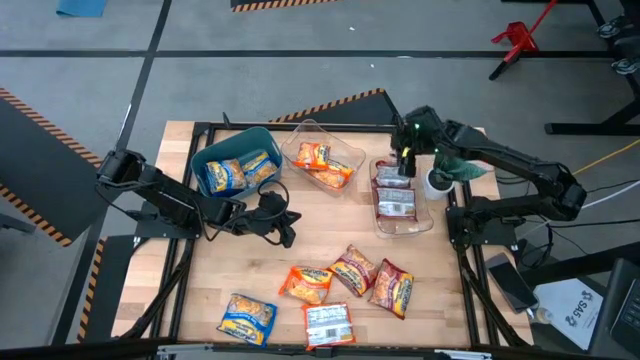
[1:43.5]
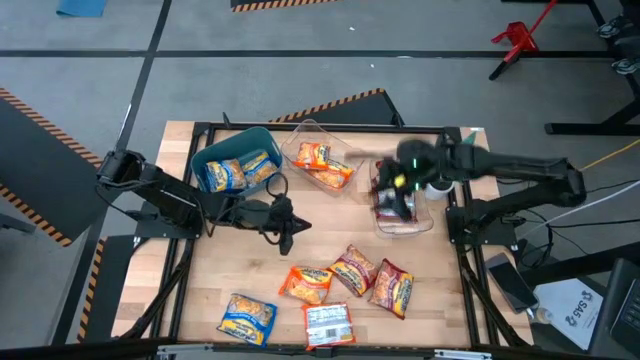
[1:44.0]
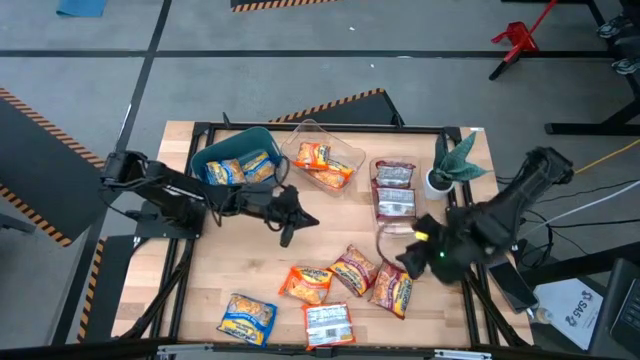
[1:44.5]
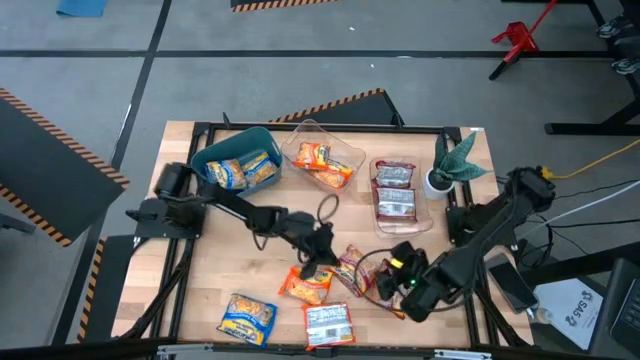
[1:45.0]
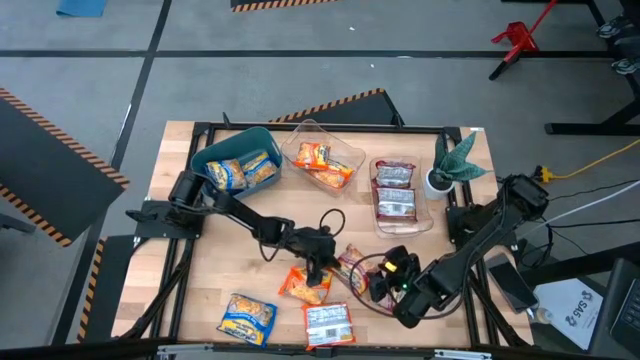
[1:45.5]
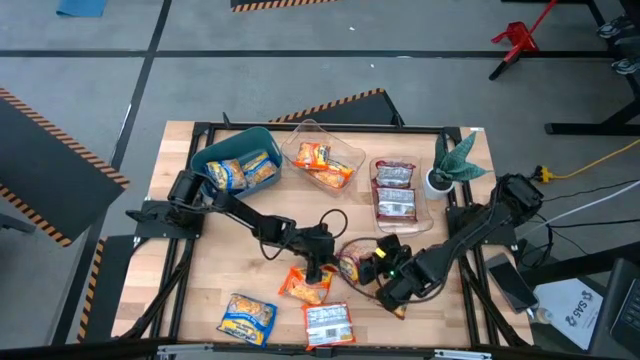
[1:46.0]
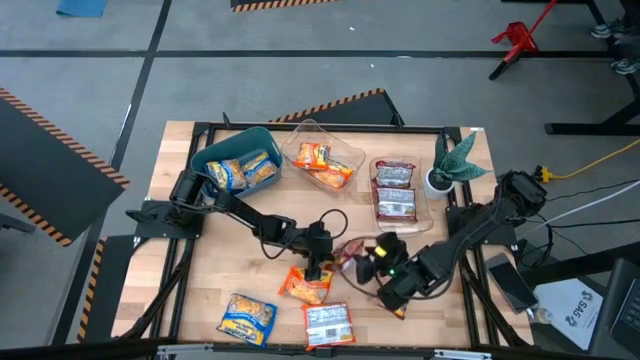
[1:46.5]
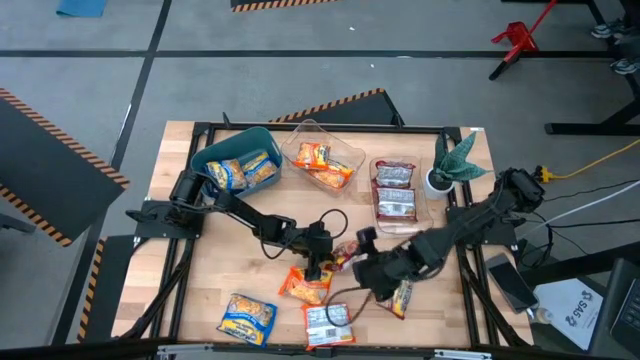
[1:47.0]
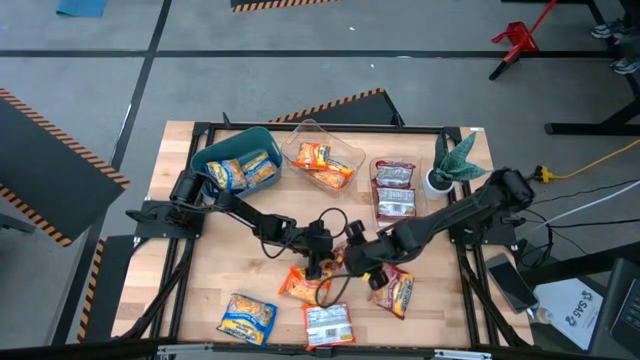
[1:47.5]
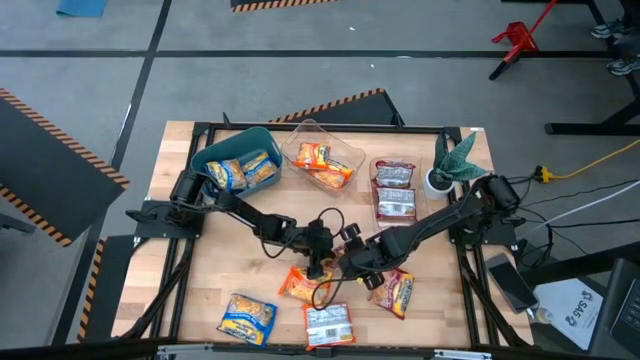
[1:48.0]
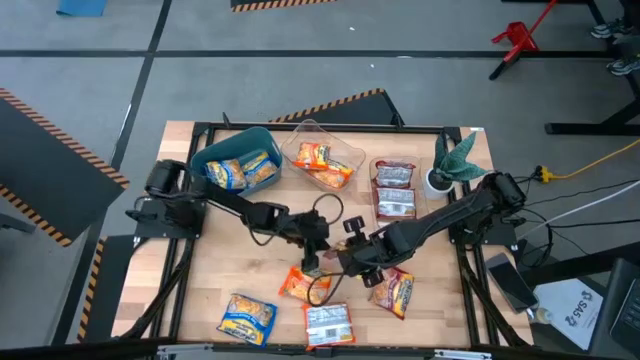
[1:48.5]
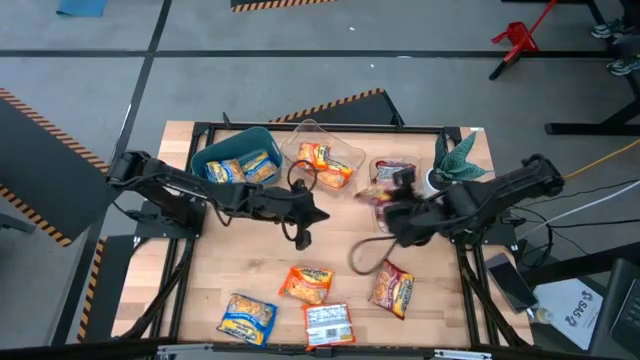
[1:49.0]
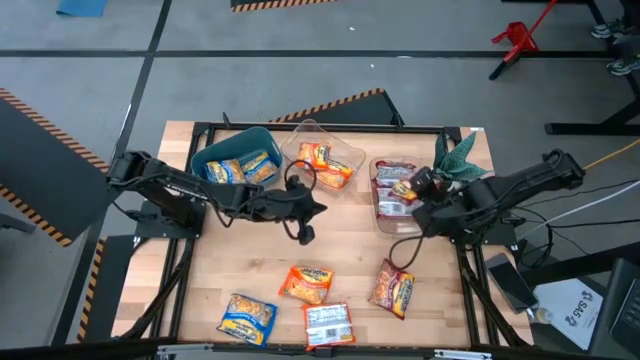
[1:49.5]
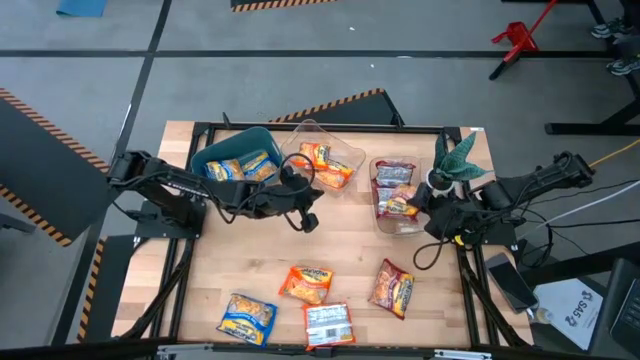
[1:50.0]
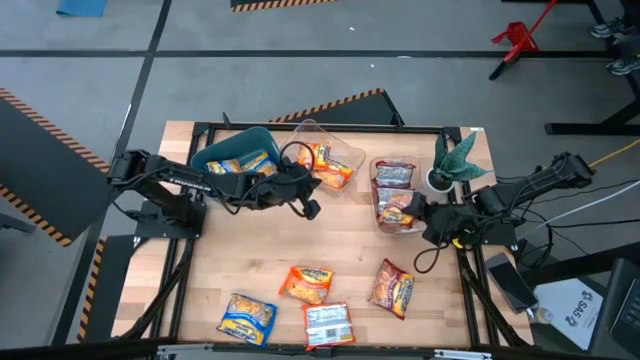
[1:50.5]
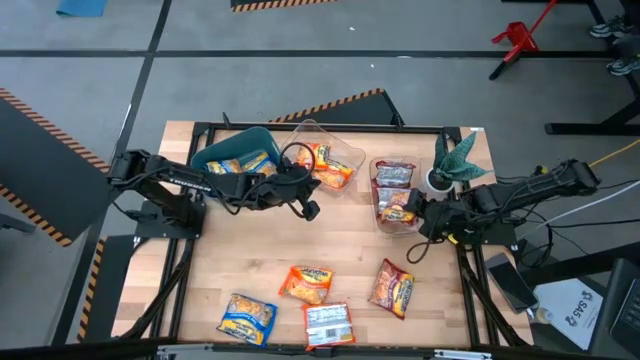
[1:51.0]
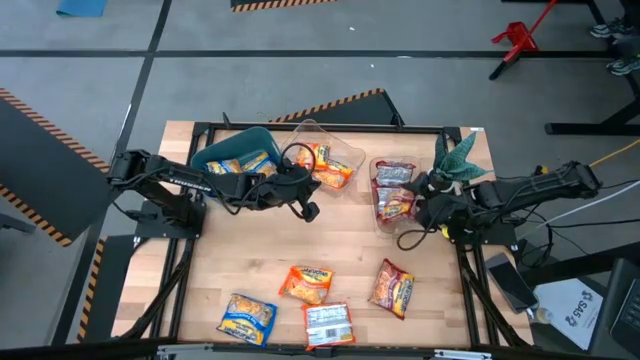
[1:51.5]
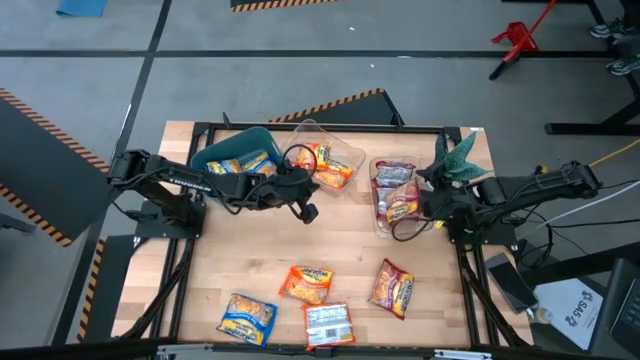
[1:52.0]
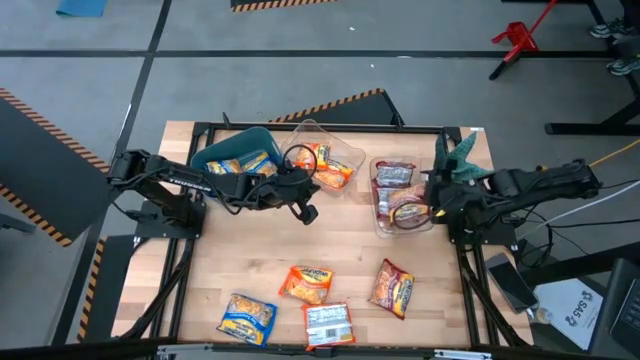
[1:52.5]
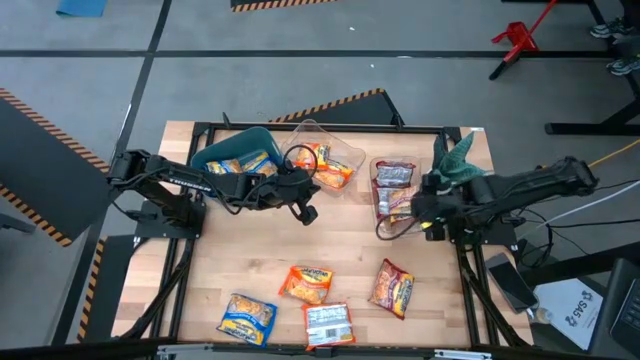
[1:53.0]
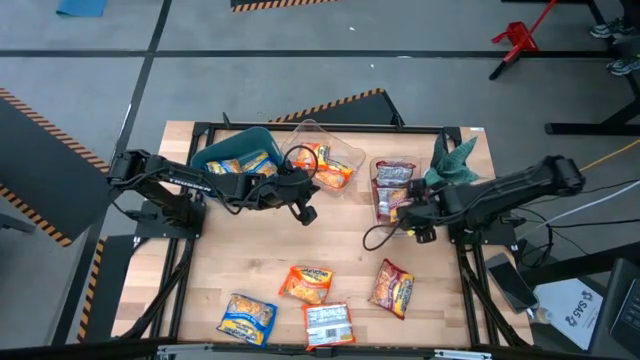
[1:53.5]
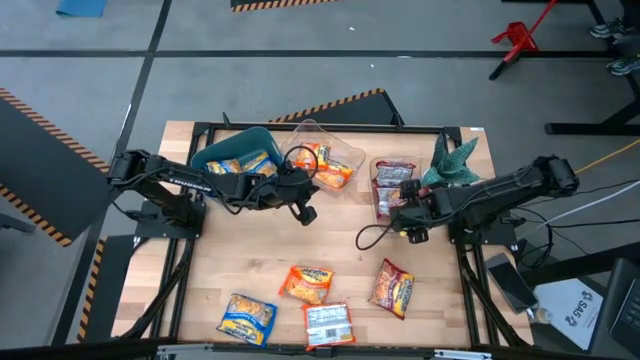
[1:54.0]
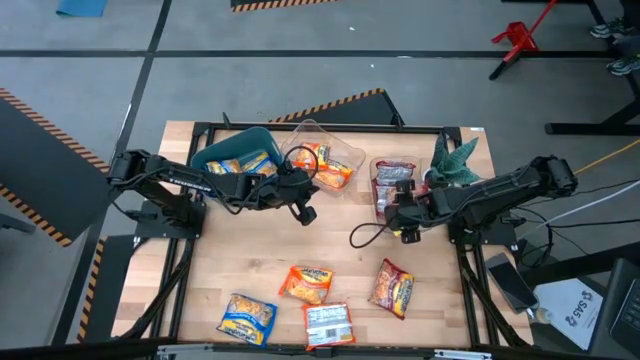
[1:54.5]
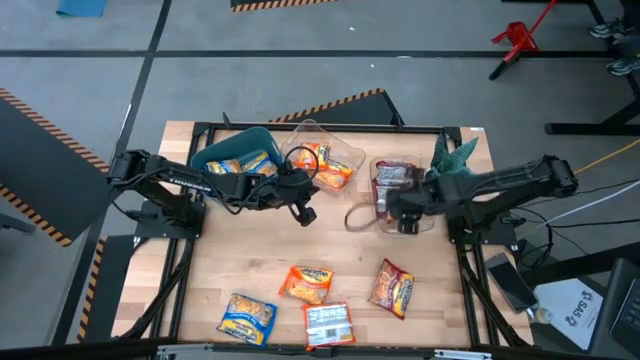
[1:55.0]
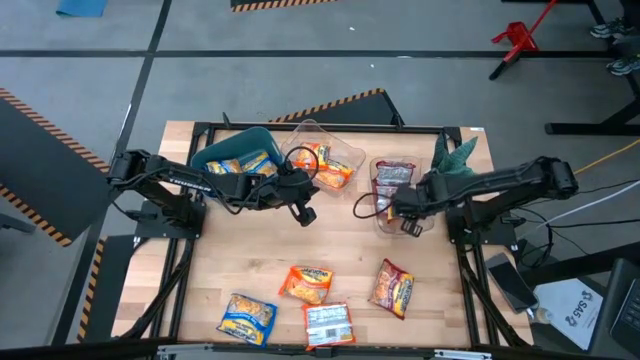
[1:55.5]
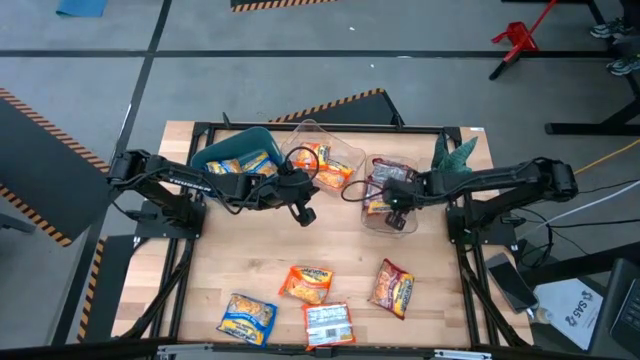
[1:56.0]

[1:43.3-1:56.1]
Task: Sort Maruchan noodles
Put the red noodle pack into the right transparent bin

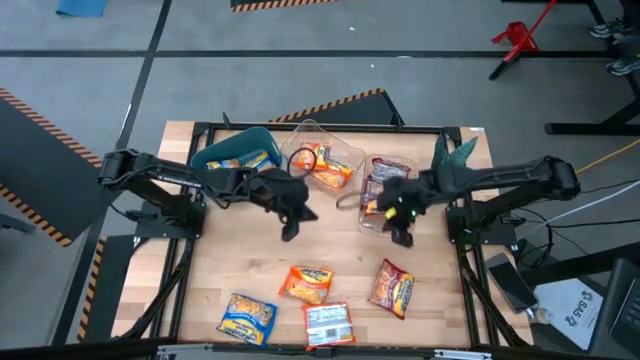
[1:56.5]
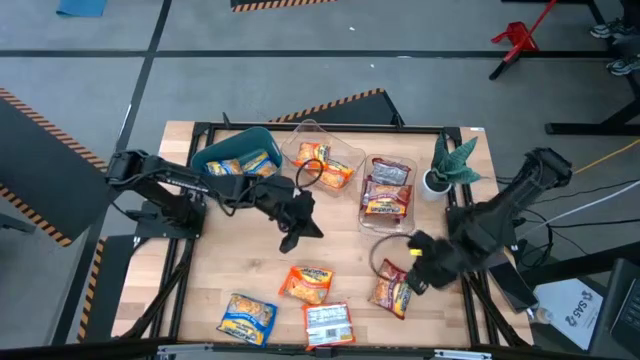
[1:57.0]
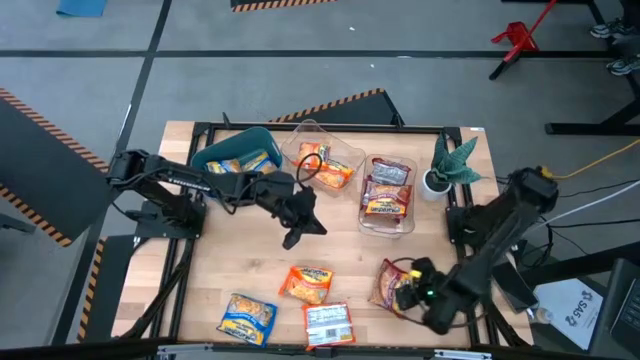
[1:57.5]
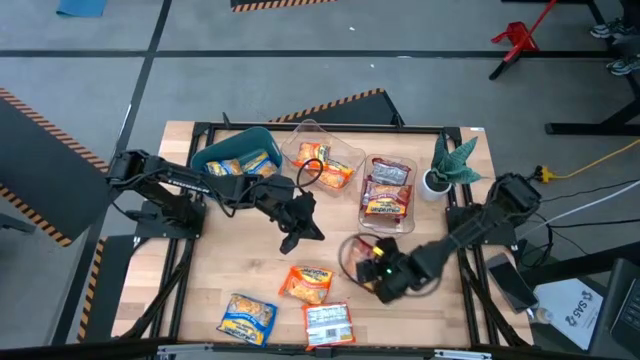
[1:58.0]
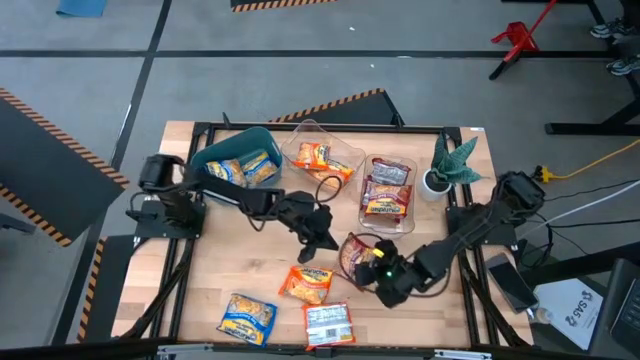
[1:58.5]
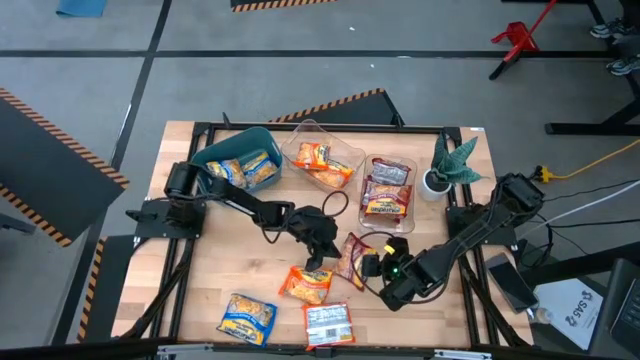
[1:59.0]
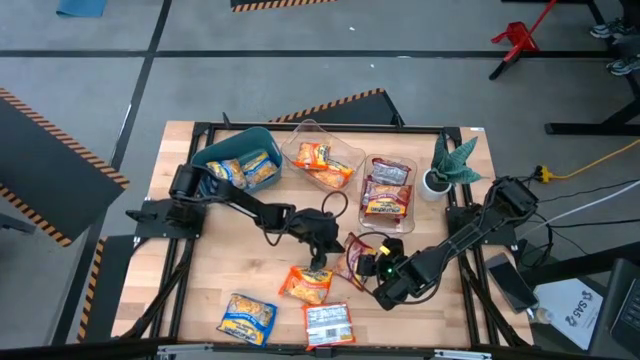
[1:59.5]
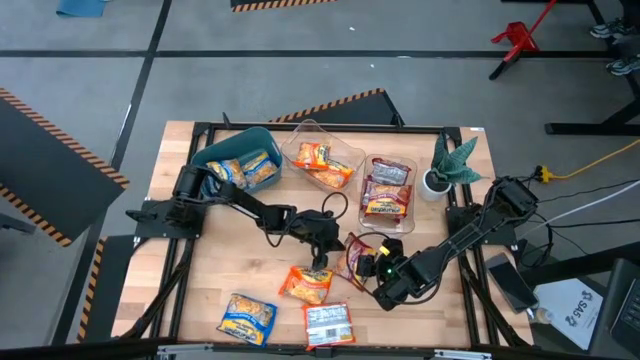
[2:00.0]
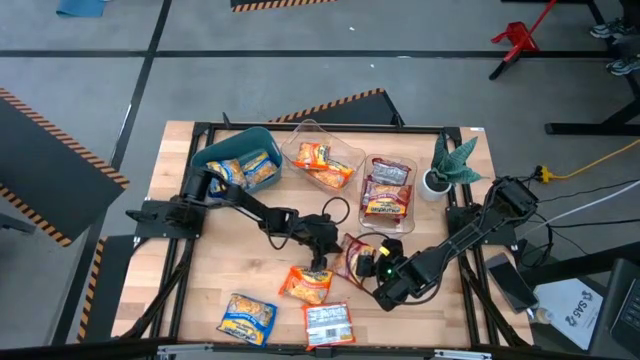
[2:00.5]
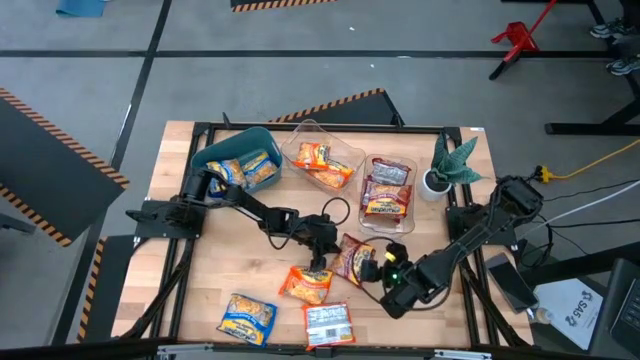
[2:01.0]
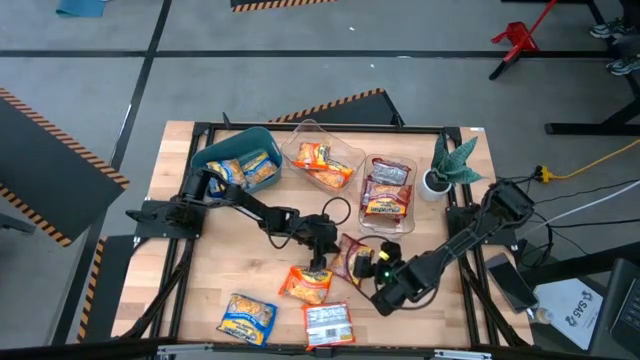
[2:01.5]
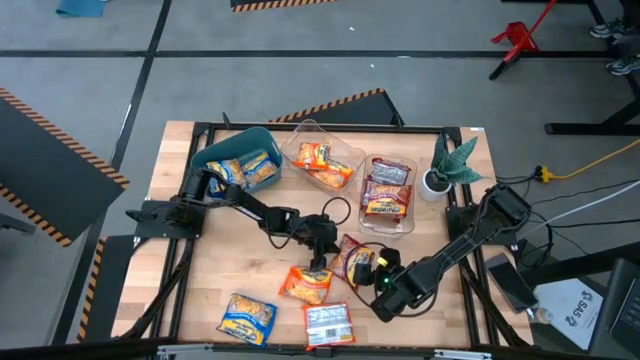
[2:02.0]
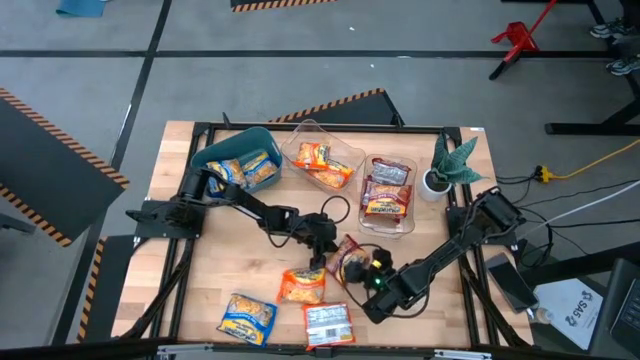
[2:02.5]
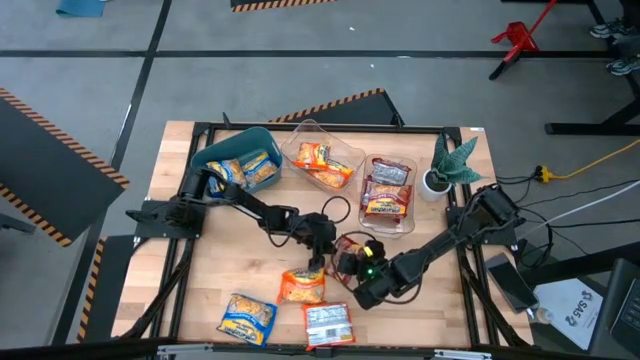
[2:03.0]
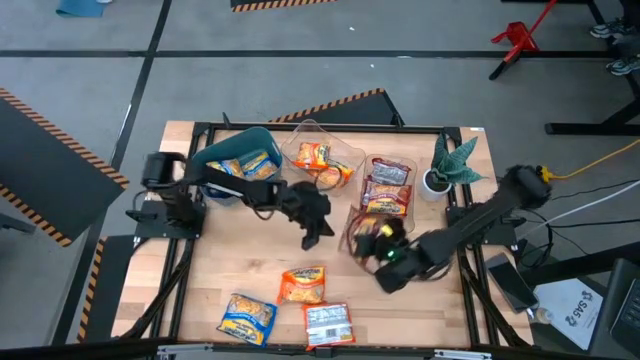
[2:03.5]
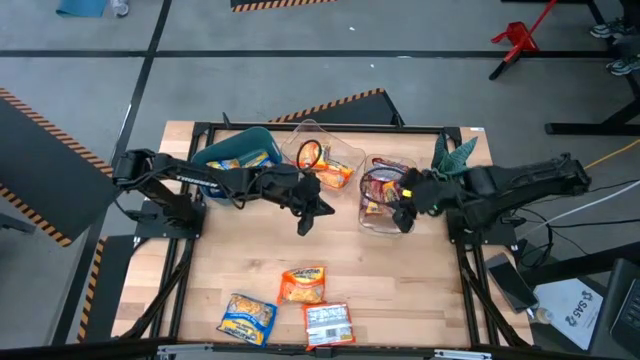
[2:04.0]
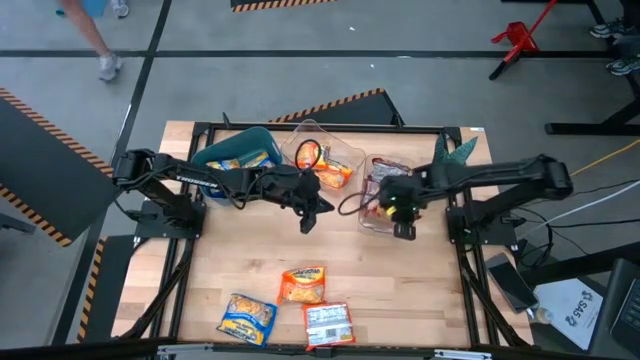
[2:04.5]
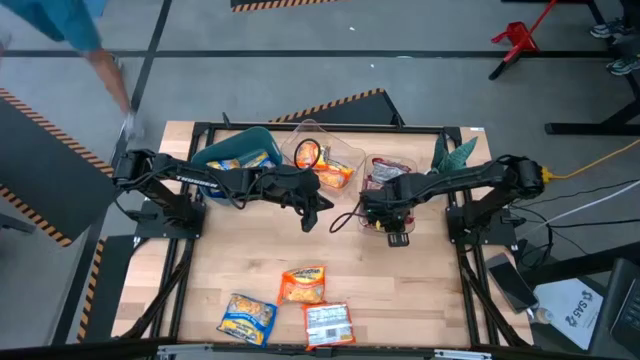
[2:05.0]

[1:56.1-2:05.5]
Put the red noodle pack into the right transparent bin
